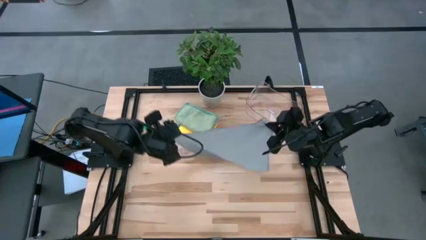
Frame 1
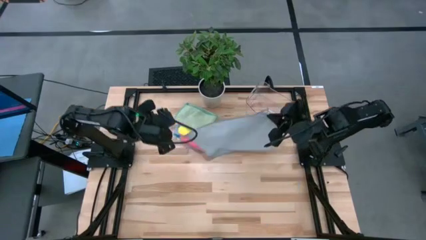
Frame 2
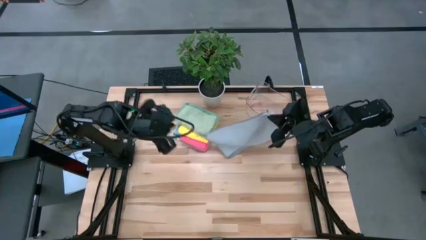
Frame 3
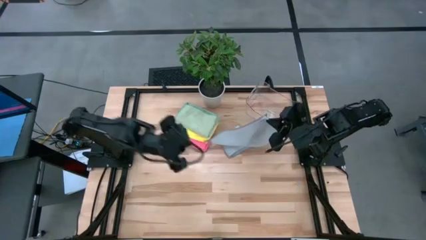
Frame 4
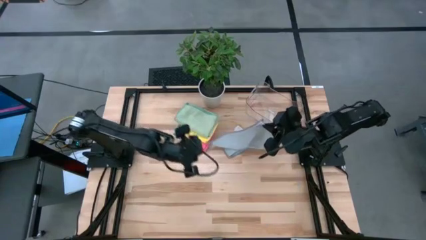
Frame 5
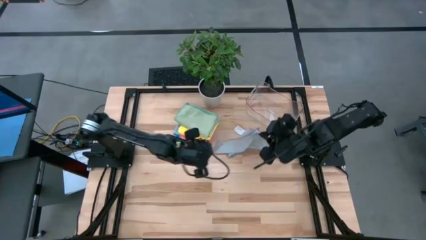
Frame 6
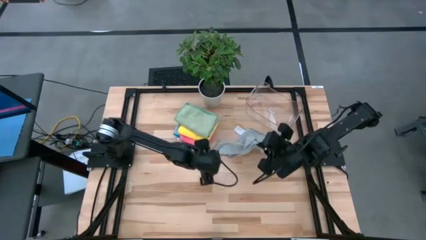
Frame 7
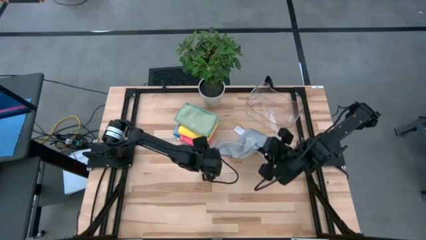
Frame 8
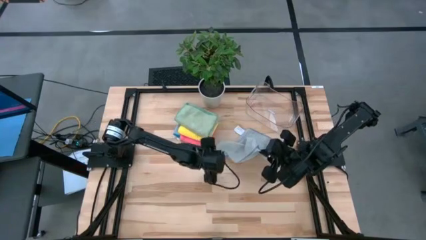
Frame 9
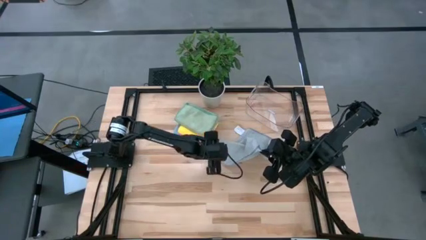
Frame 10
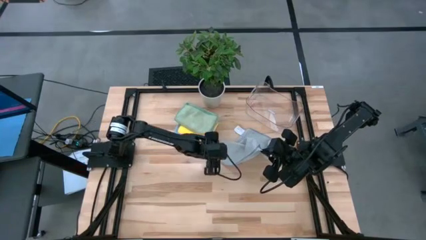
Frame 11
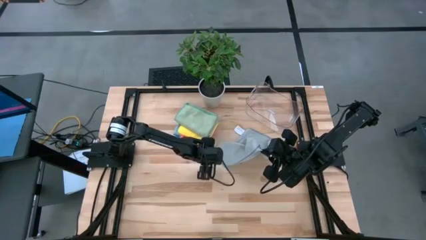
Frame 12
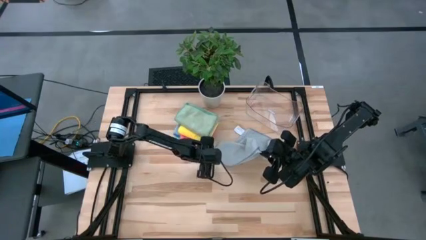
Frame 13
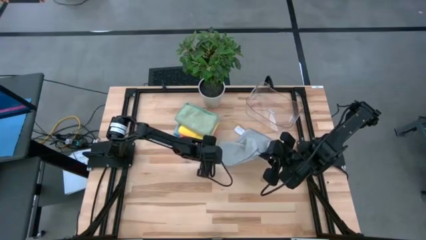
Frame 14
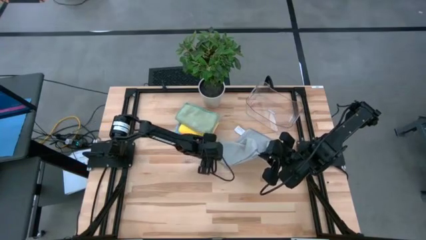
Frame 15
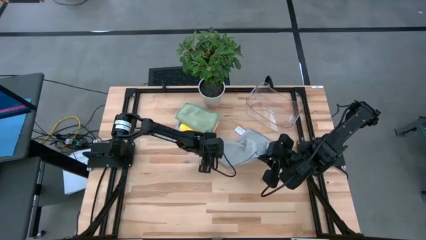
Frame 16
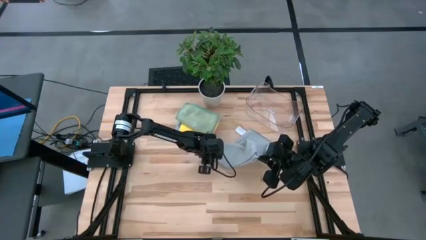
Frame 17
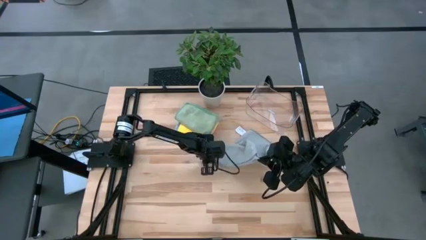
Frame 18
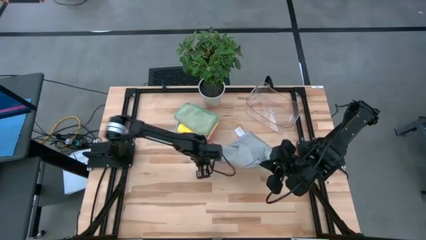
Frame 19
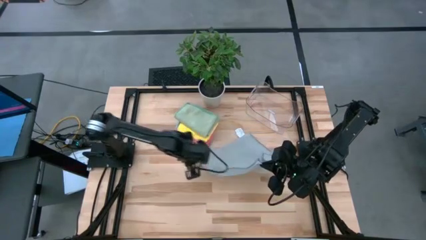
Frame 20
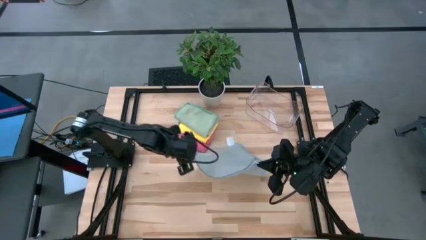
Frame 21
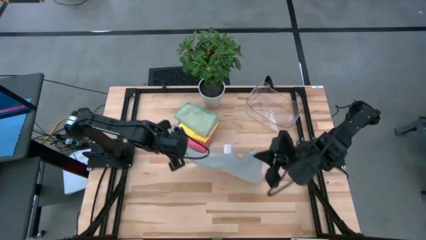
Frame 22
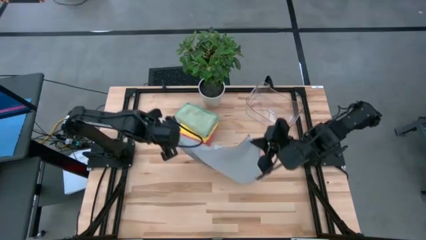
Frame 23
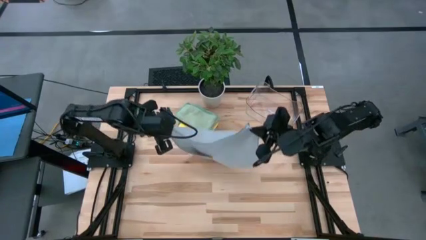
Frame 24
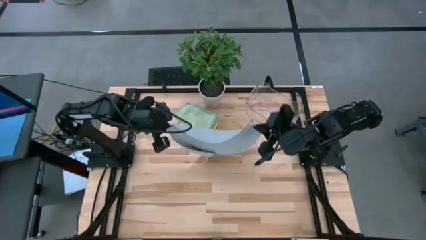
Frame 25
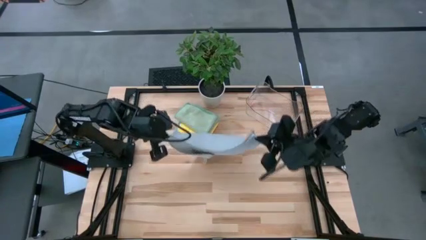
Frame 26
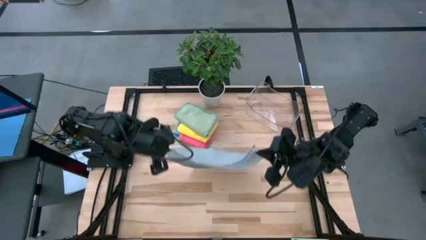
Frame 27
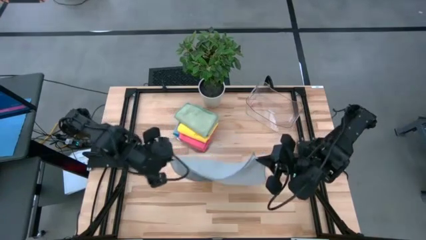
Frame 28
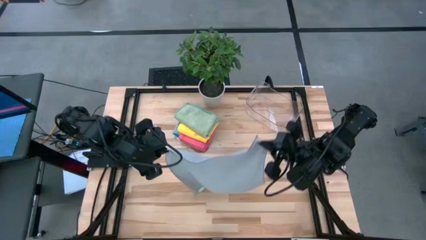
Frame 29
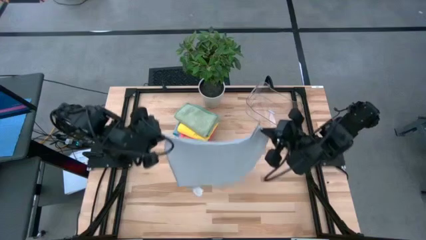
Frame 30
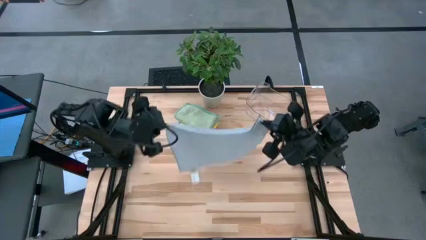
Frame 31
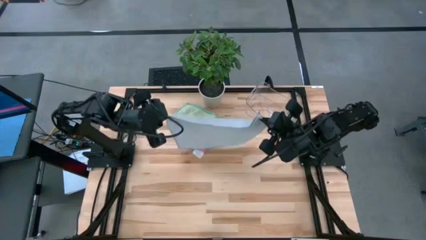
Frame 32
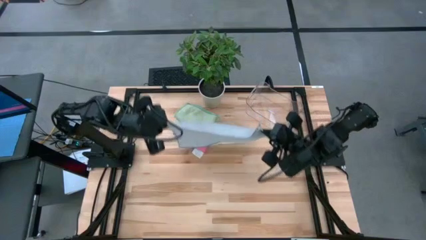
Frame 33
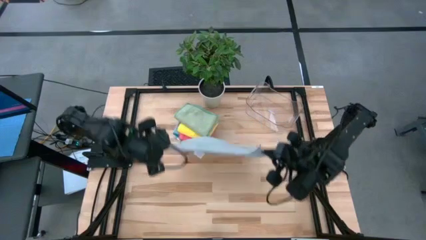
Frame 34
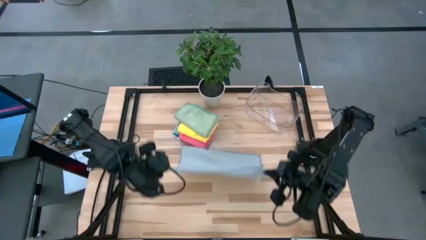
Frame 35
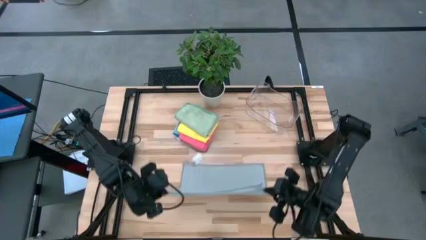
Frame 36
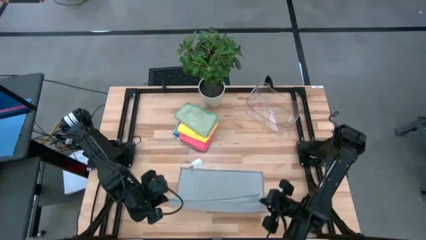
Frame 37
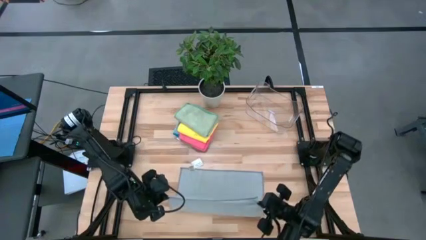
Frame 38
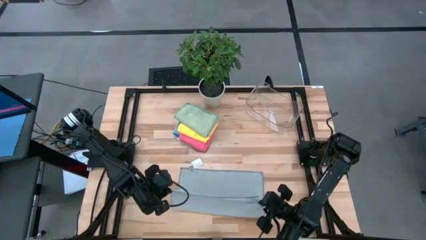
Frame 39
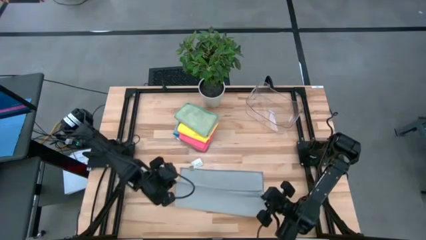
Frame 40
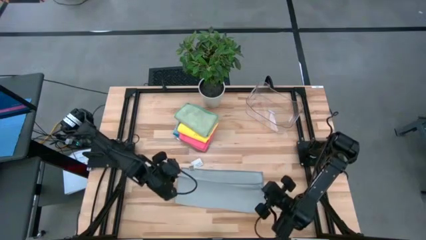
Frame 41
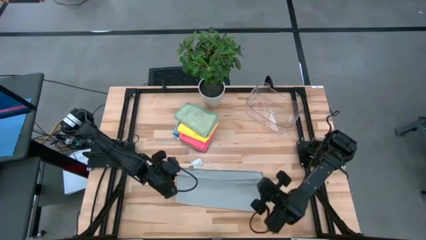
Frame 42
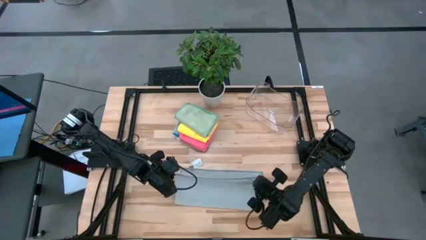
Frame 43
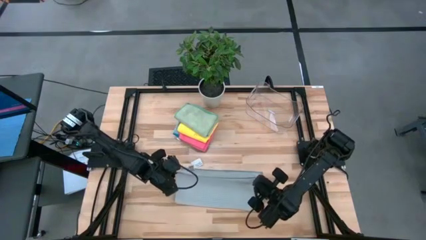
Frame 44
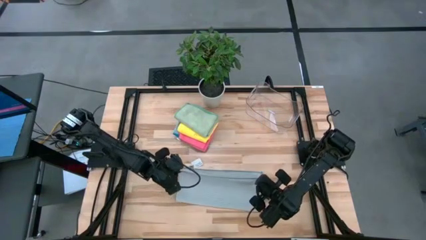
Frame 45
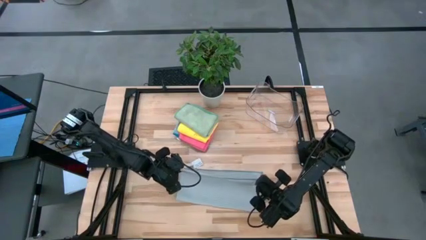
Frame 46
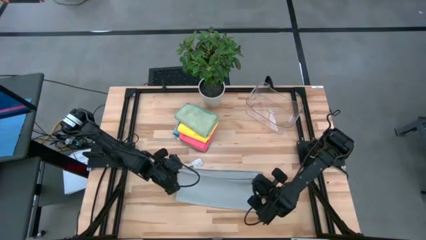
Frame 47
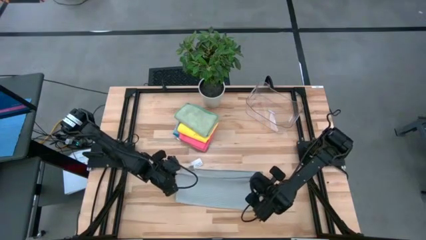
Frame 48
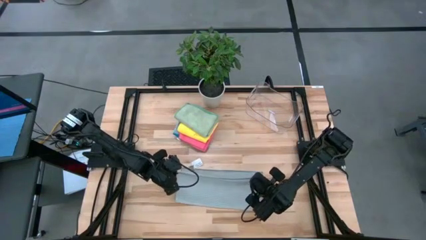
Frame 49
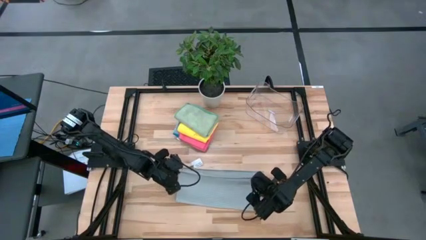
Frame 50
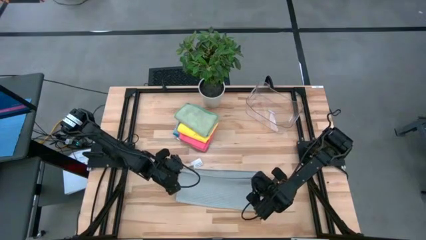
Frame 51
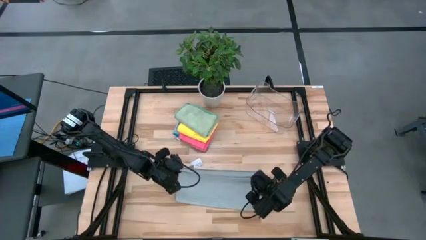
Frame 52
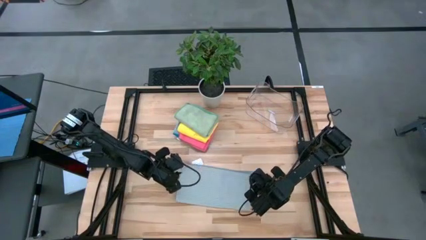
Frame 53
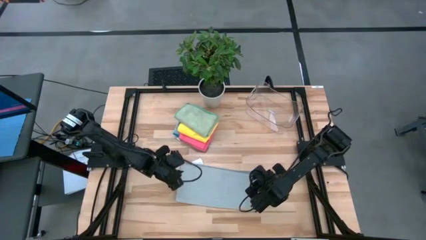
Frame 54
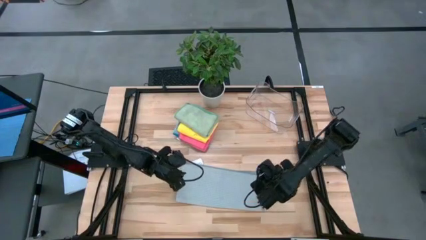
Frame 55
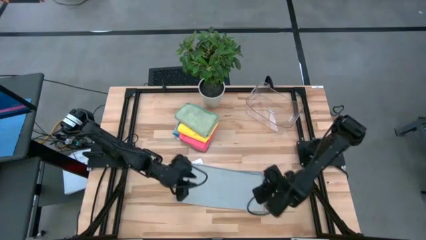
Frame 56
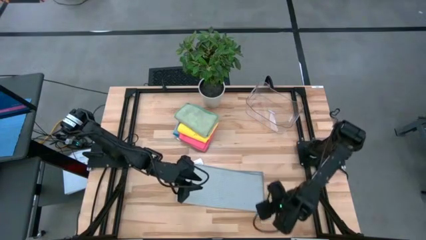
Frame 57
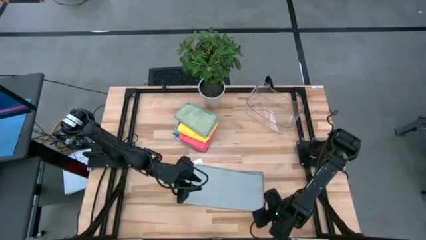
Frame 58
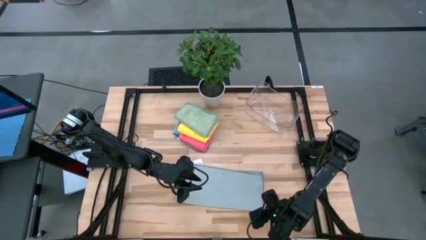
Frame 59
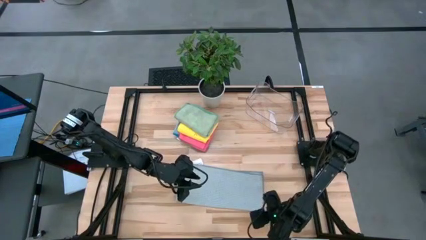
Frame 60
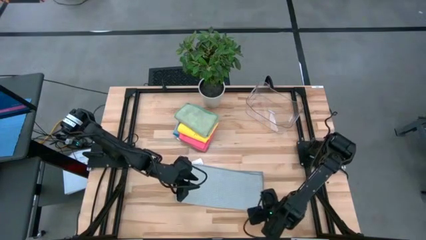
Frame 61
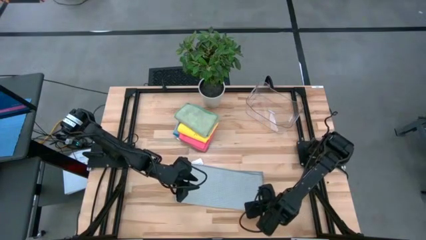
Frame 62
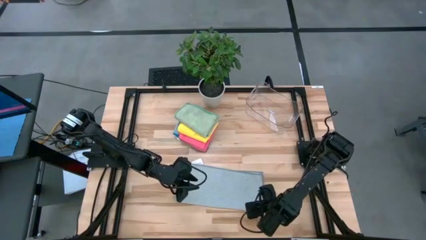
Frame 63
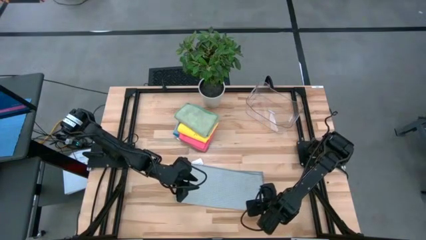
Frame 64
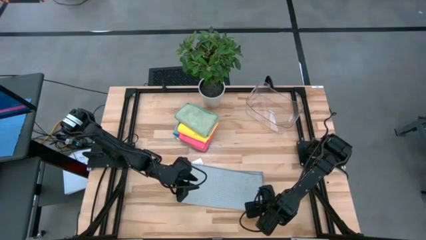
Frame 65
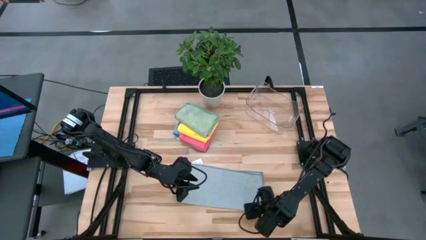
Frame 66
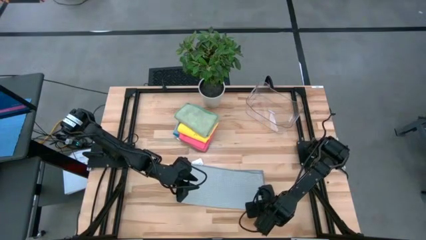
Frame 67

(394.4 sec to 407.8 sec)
Task: Fold microfiber towels
Fold the gray microfiber towel

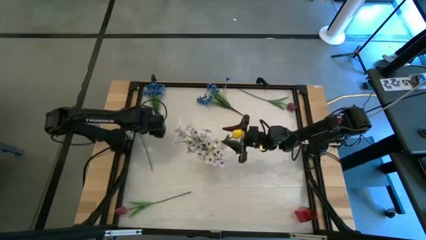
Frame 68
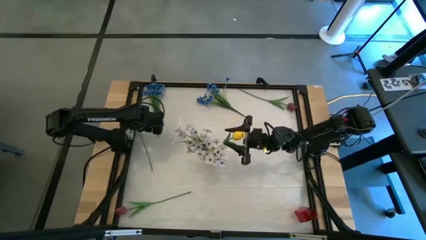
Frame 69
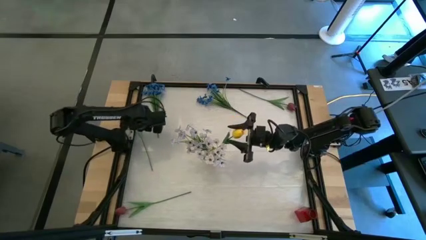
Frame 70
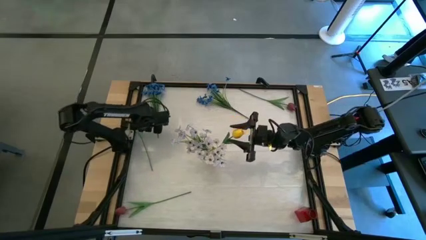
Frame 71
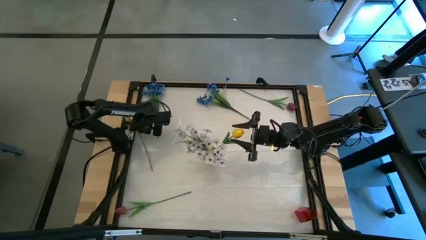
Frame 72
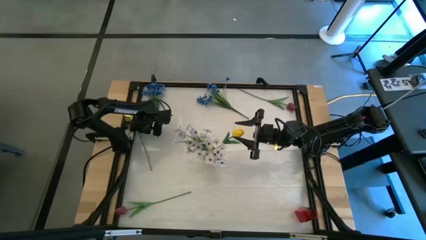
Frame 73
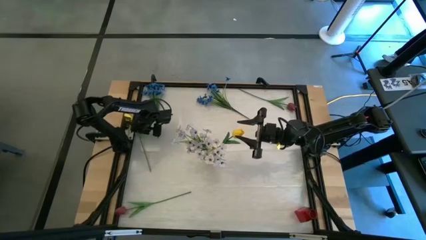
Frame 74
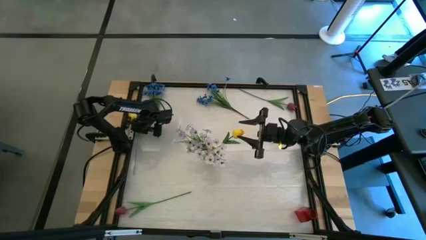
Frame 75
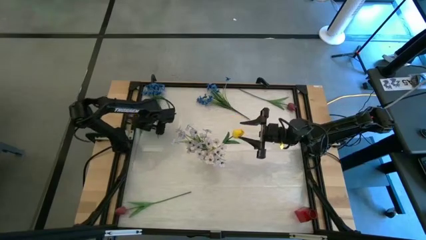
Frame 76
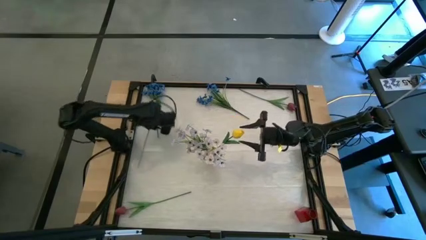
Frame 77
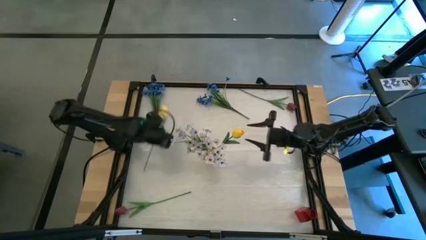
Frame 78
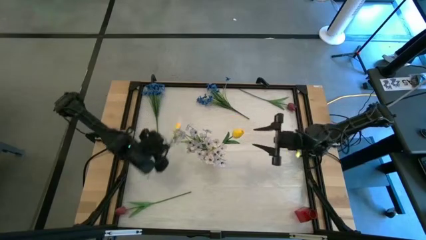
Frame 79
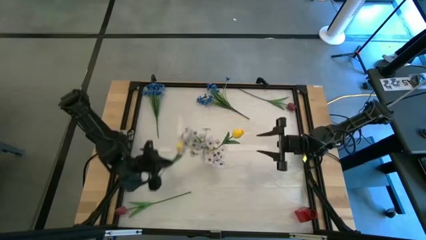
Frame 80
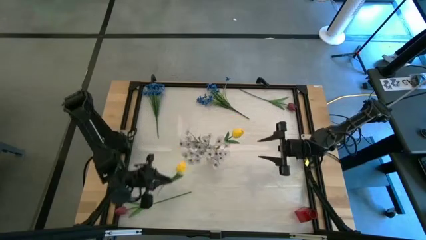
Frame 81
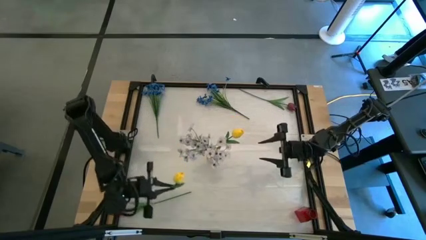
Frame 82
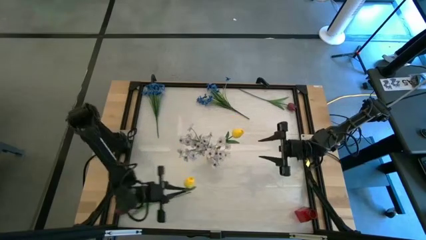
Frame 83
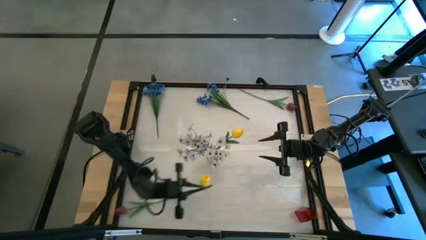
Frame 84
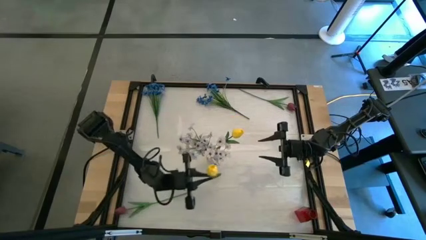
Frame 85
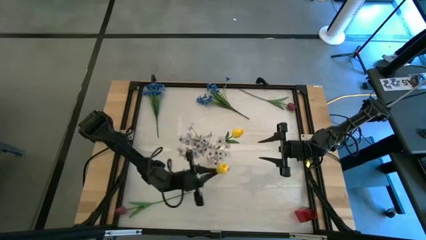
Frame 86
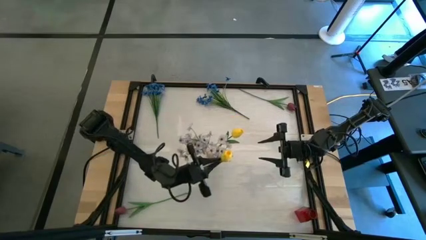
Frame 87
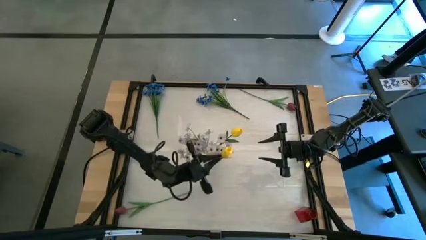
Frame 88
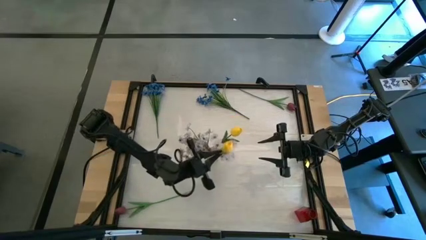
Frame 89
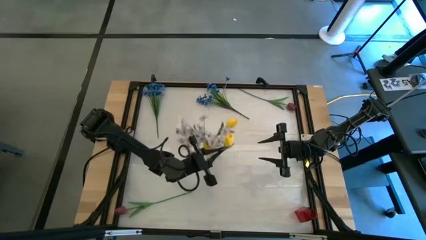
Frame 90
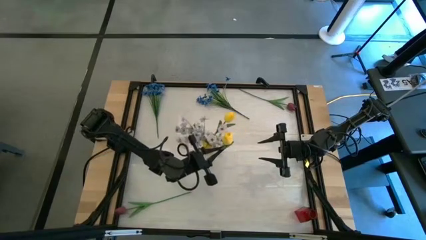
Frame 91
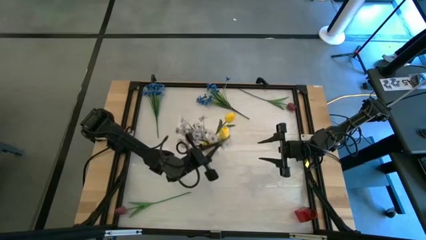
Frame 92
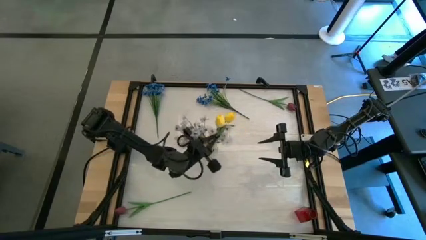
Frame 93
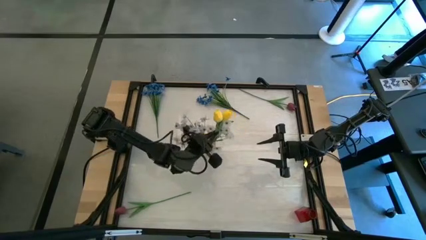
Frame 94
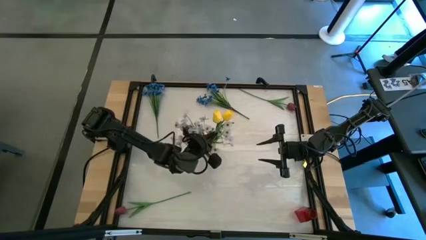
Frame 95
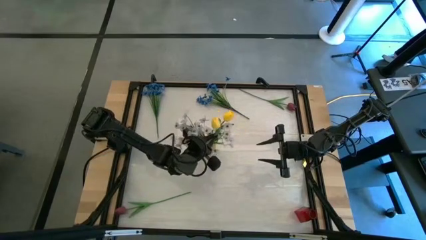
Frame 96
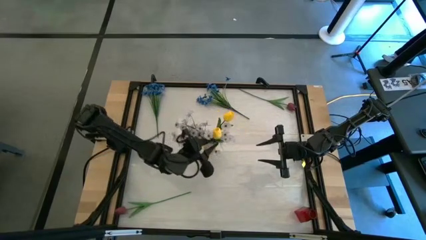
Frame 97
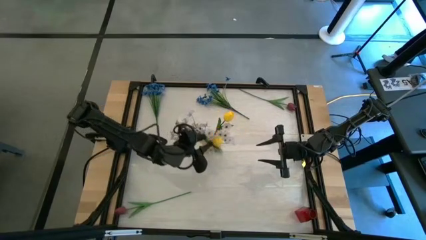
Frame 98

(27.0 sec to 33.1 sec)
Task: Sort flowers into vase by color
Put the yellow flower into the yellow vase
